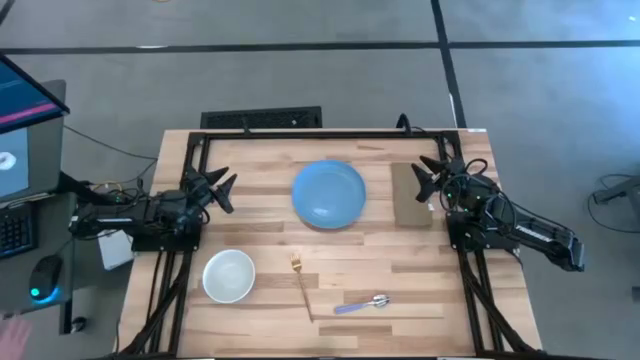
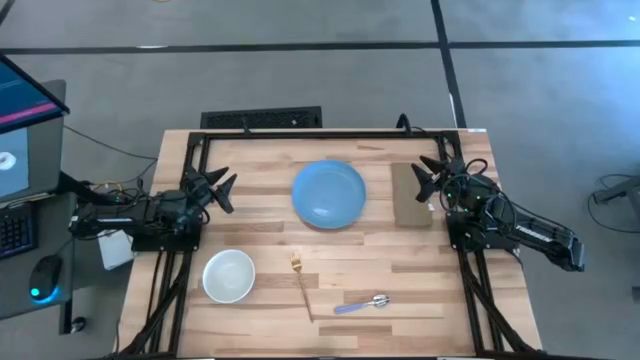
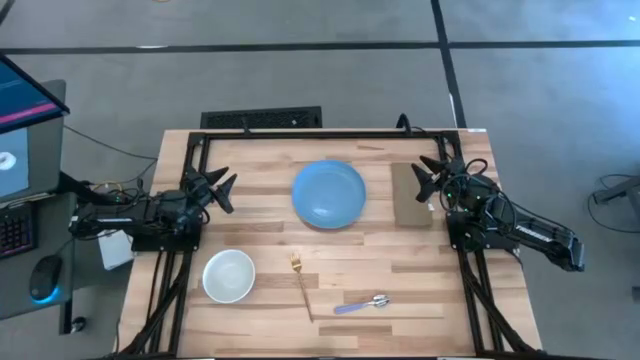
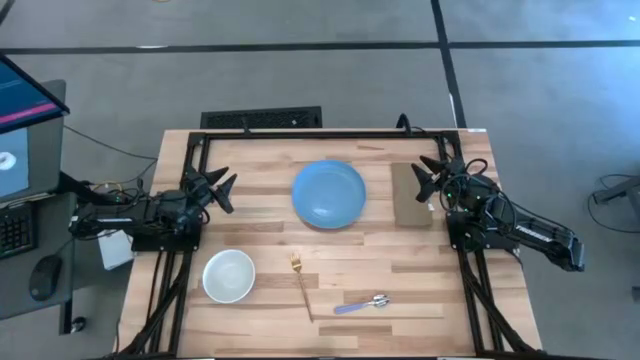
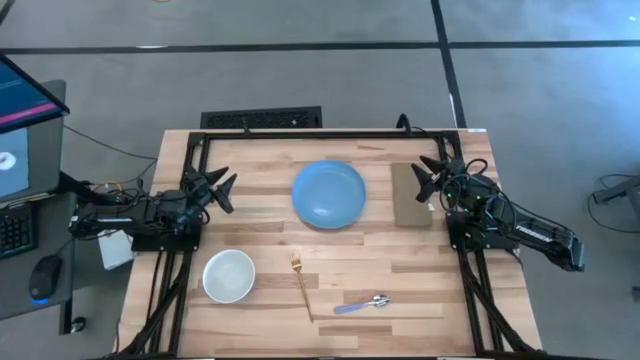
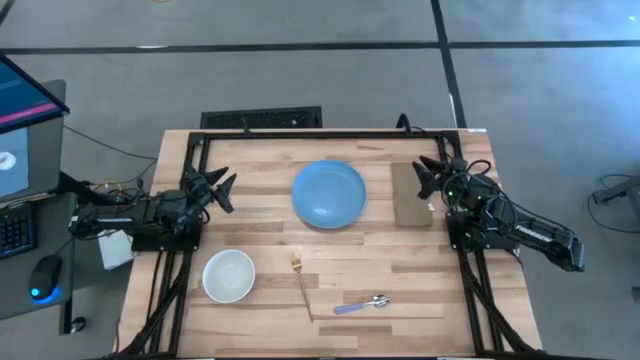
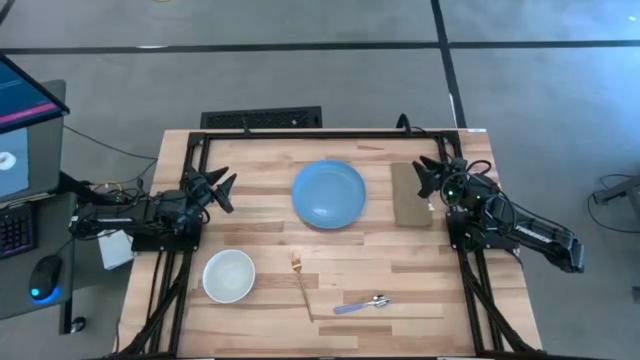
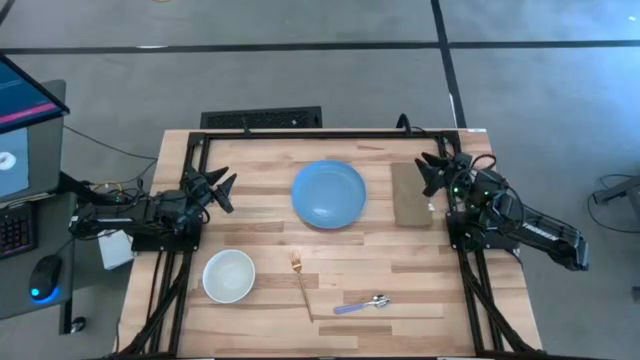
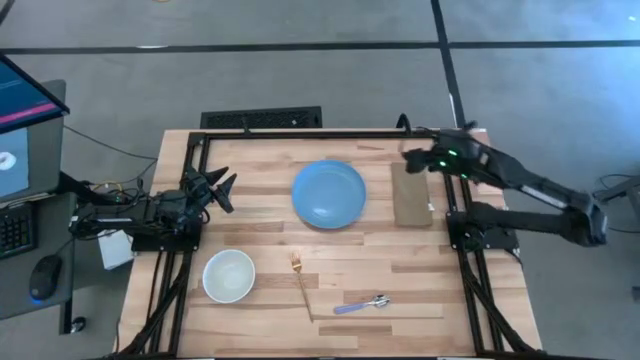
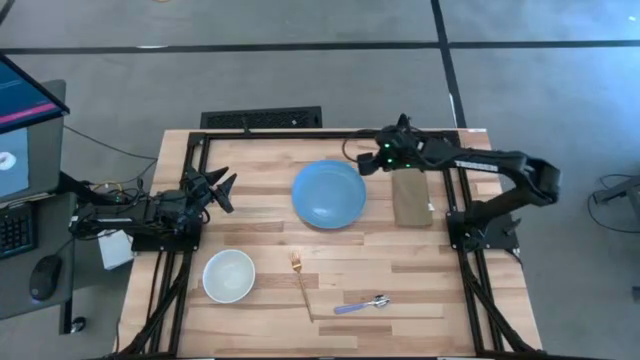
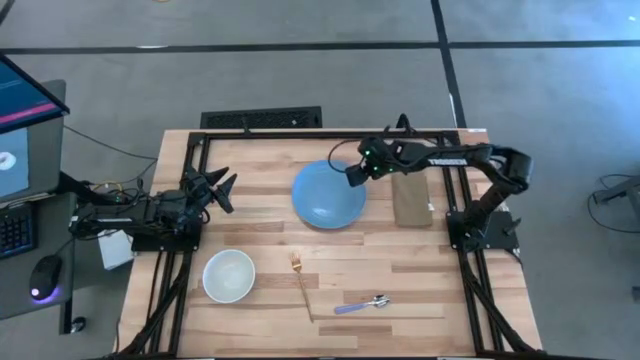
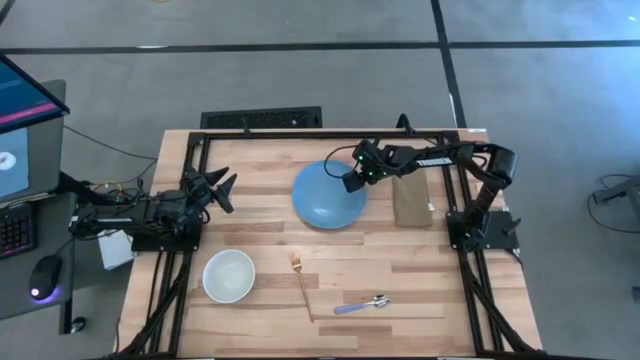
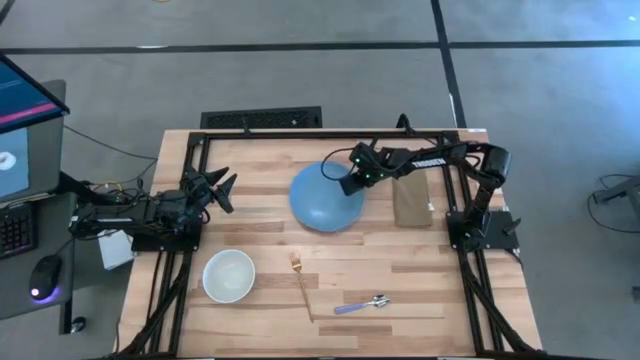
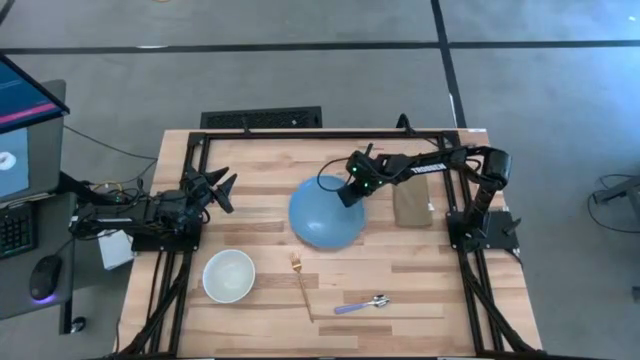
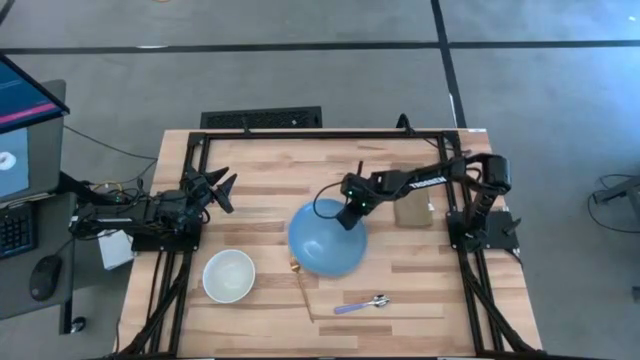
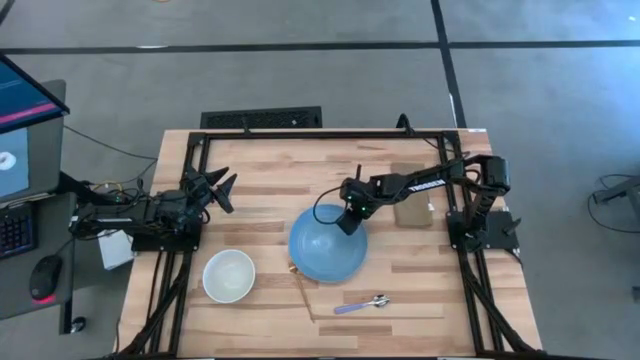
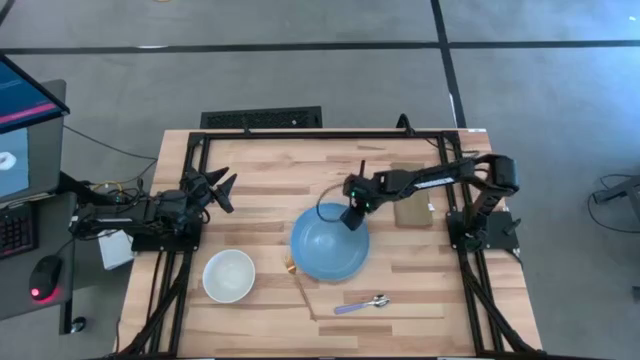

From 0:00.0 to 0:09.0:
Task: Set table place
Place the blue plate in the center of the table

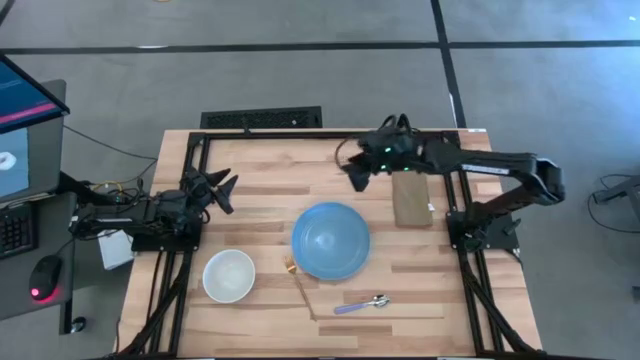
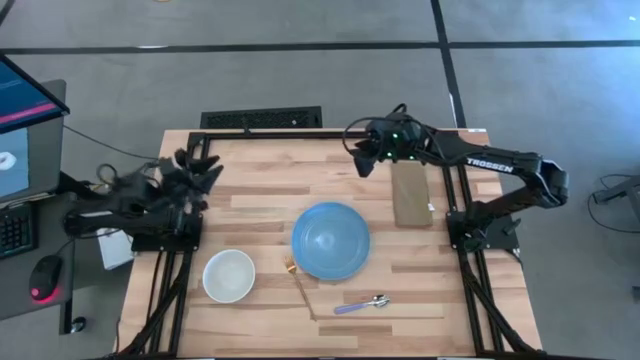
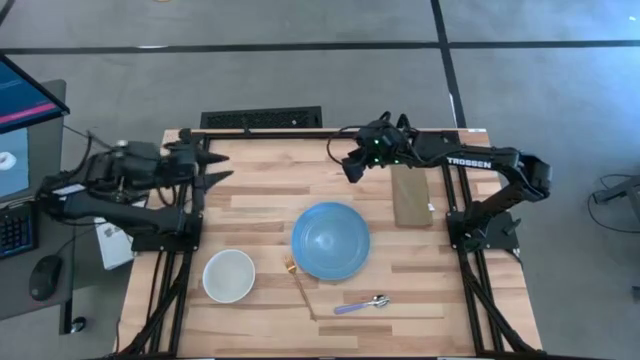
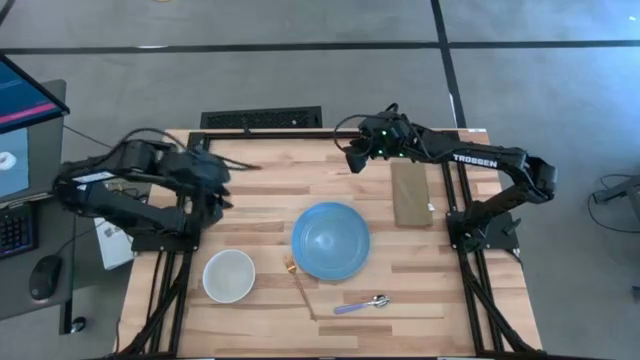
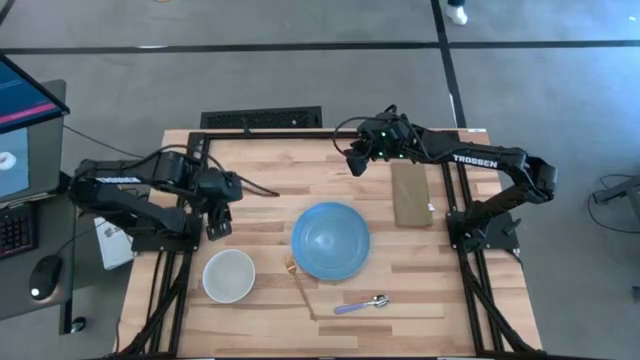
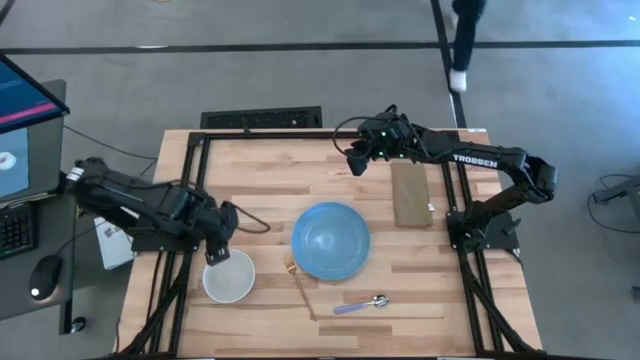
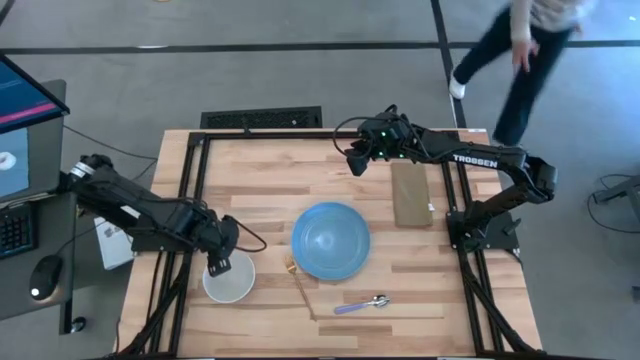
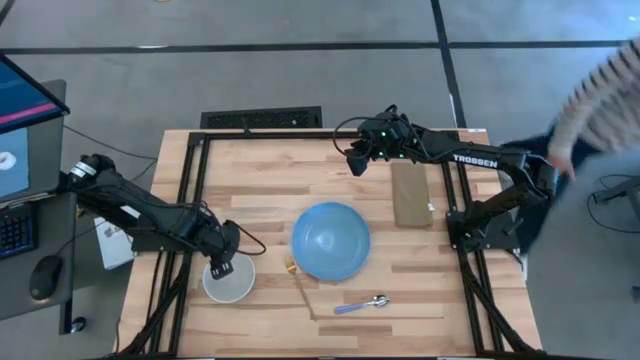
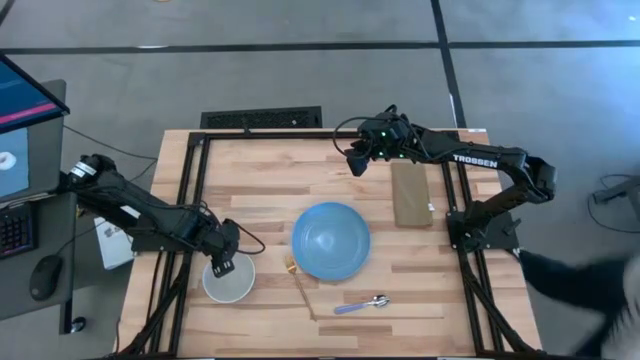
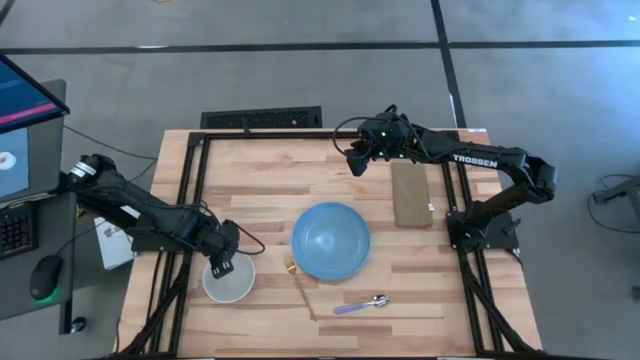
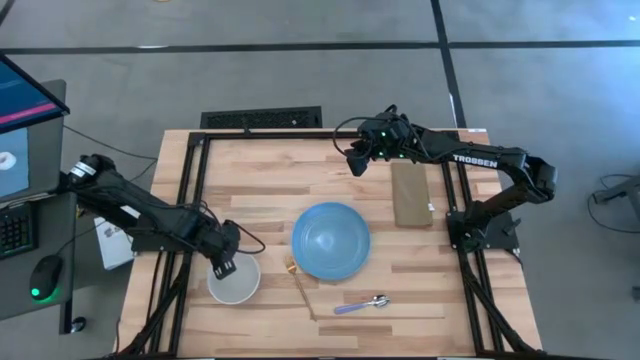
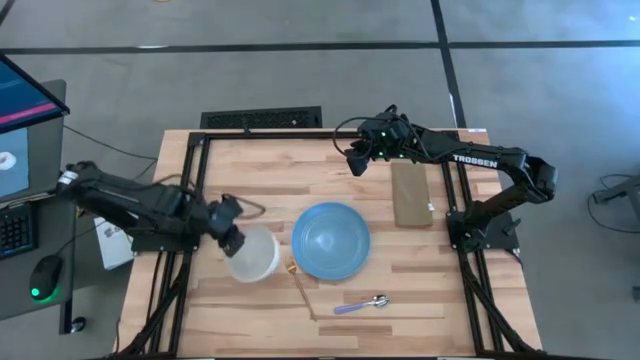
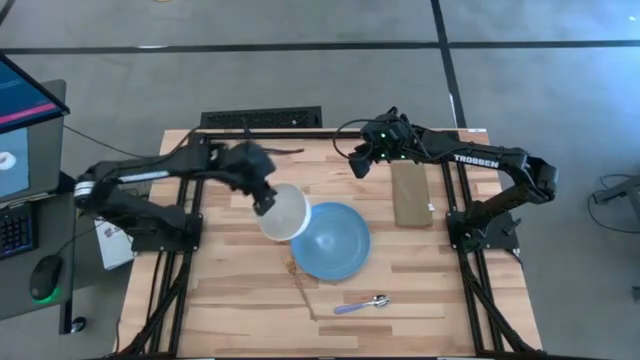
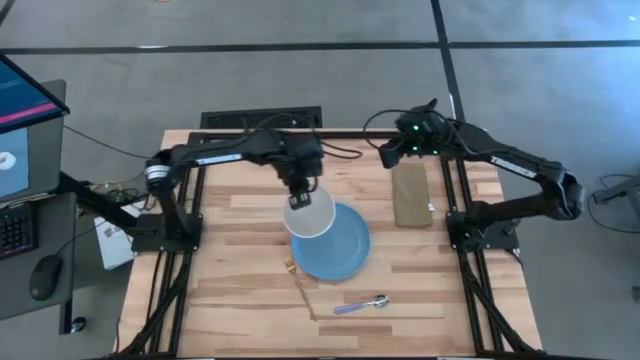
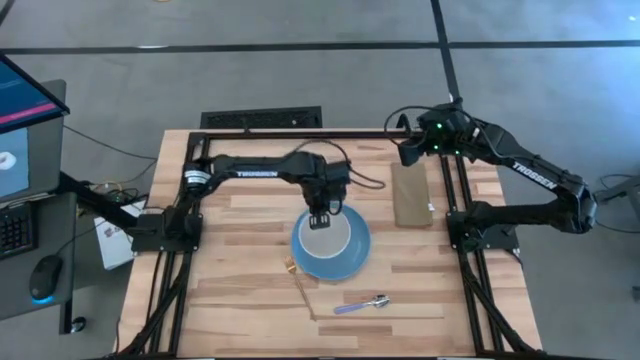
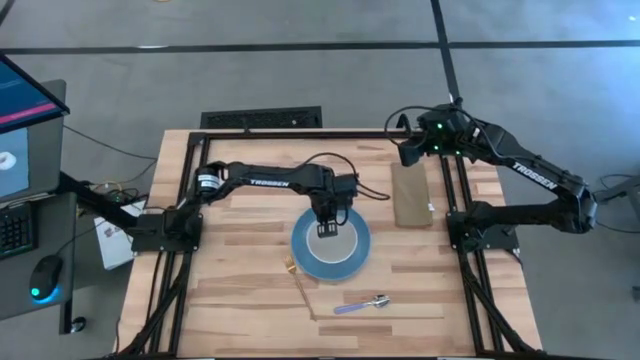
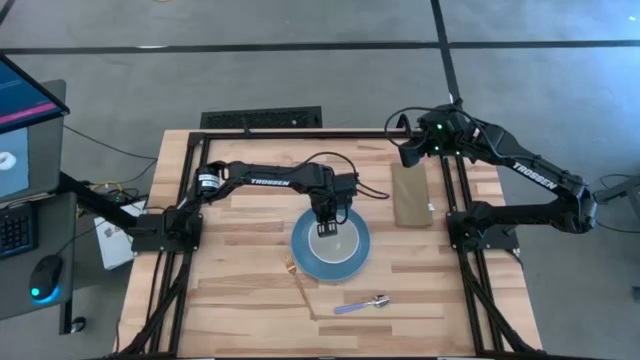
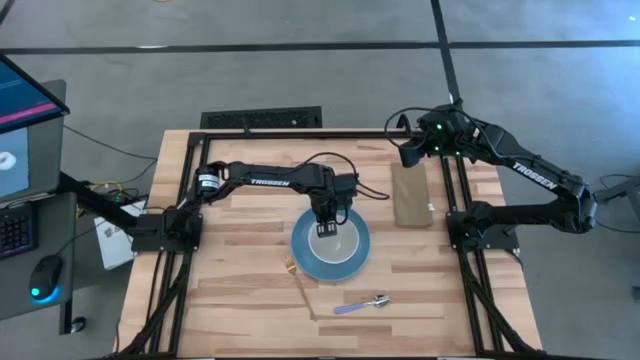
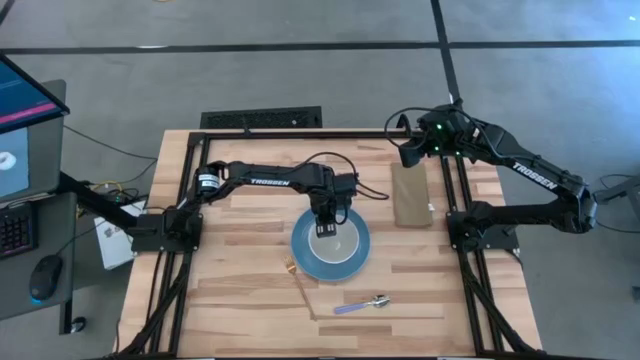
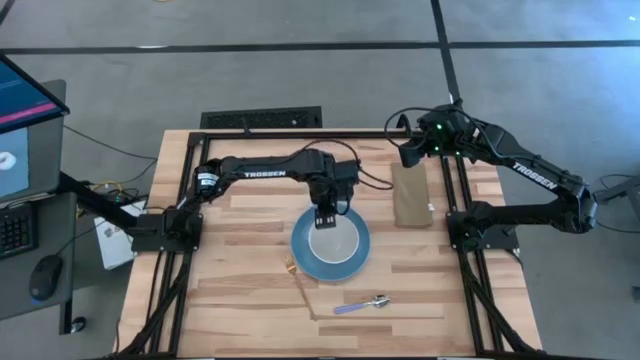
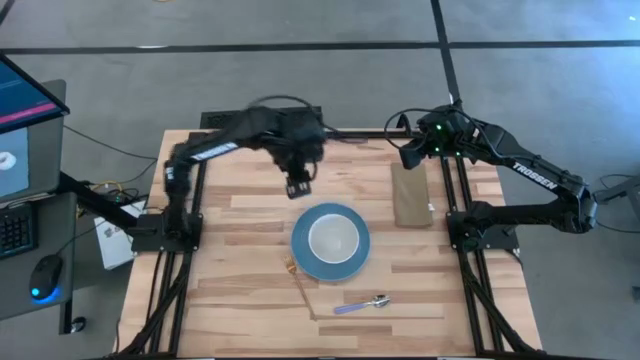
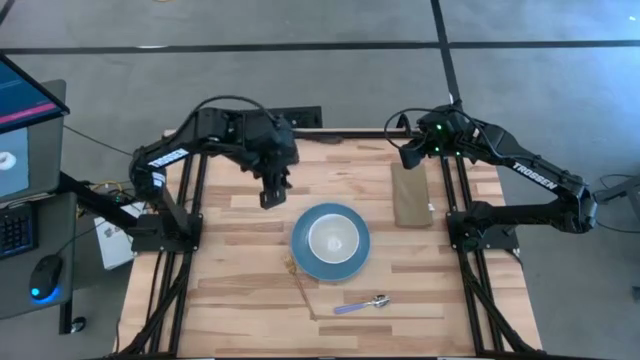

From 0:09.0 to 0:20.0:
Stack the white bowl on the blue plate

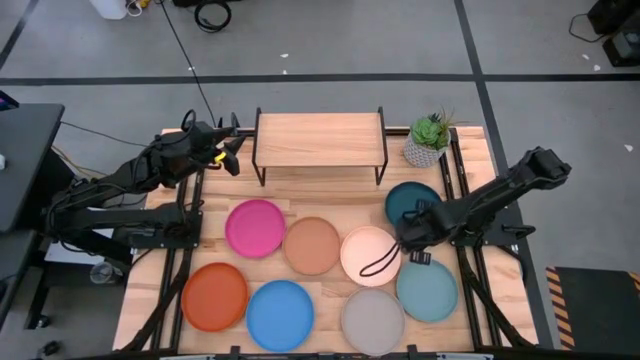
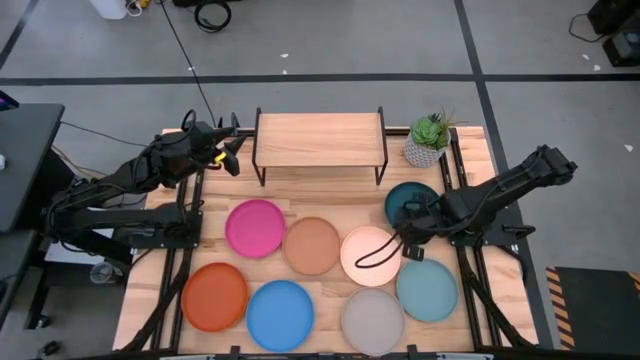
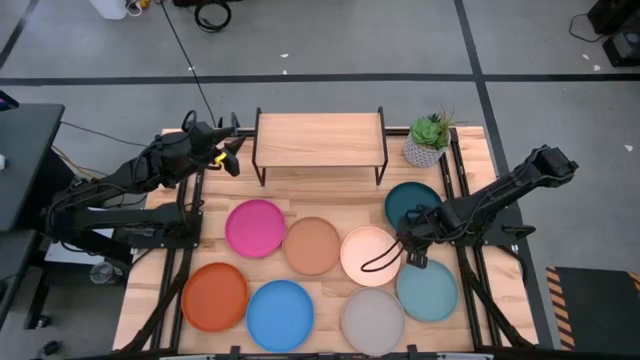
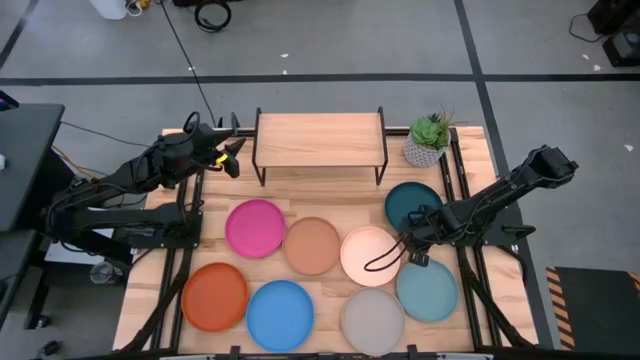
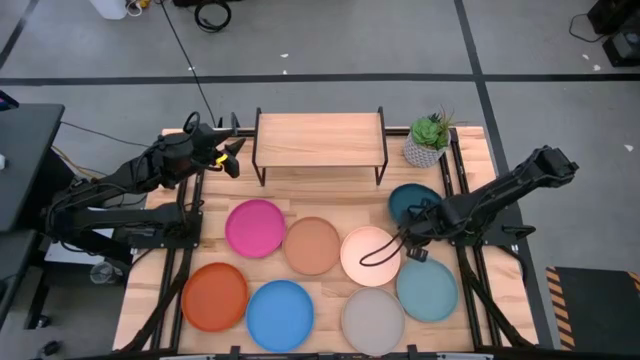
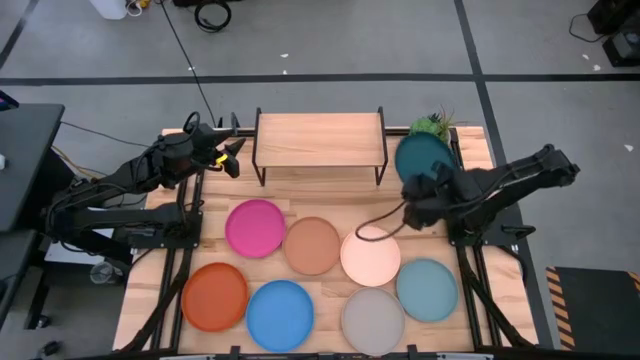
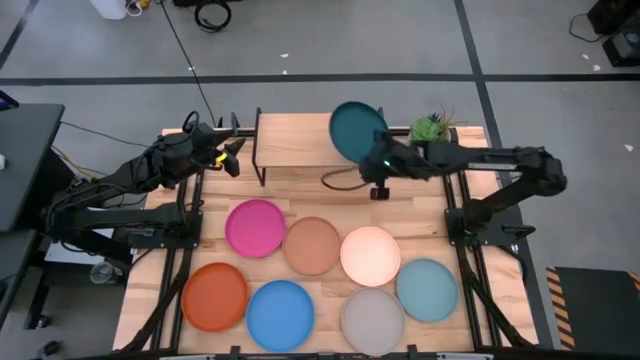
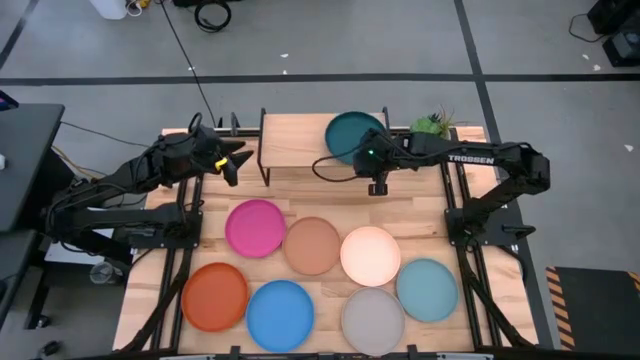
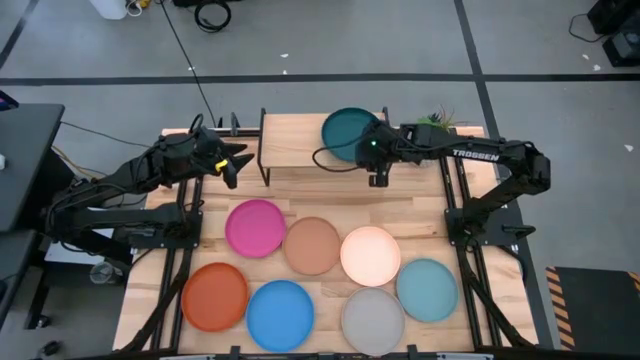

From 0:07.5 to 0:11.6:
Task: Place and stack plates onto a shelf
Put the dark blue plate on the shelf
